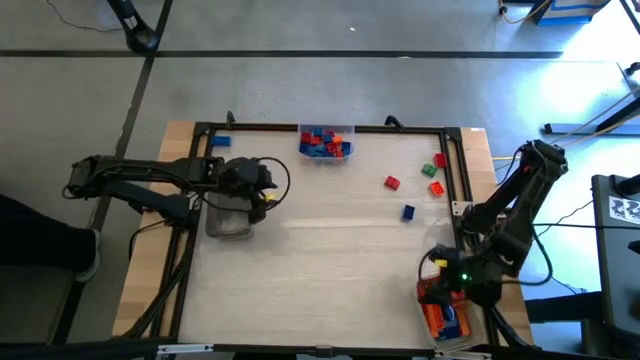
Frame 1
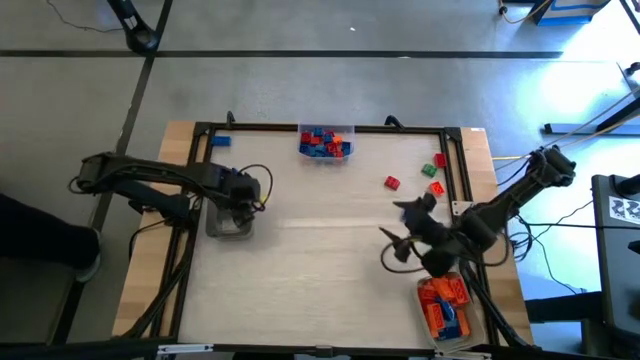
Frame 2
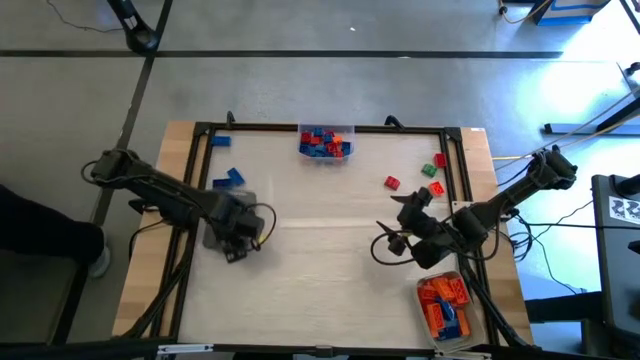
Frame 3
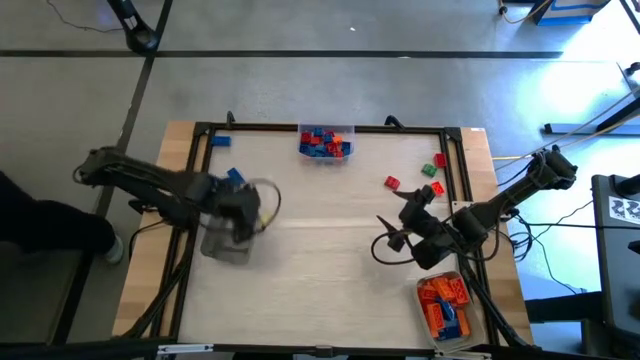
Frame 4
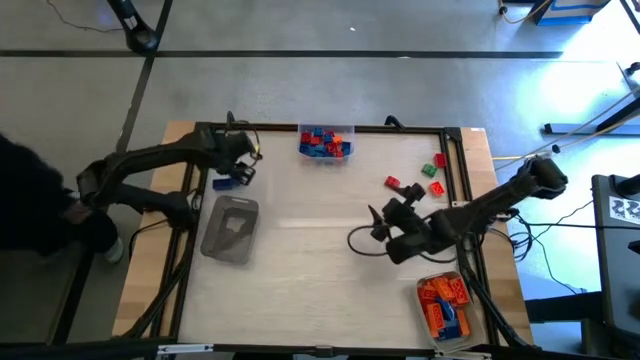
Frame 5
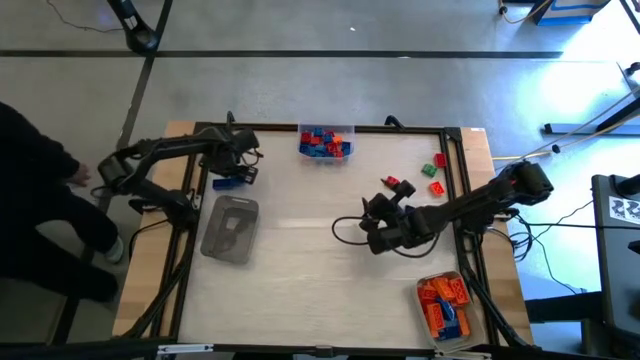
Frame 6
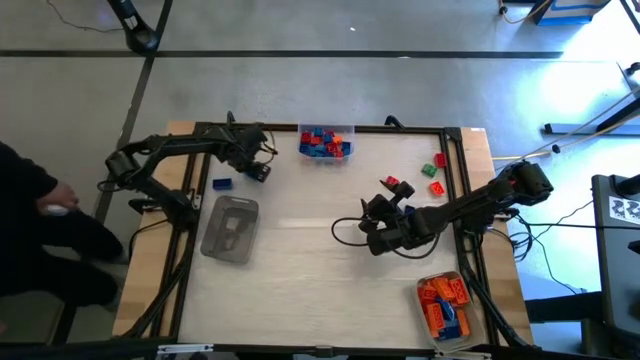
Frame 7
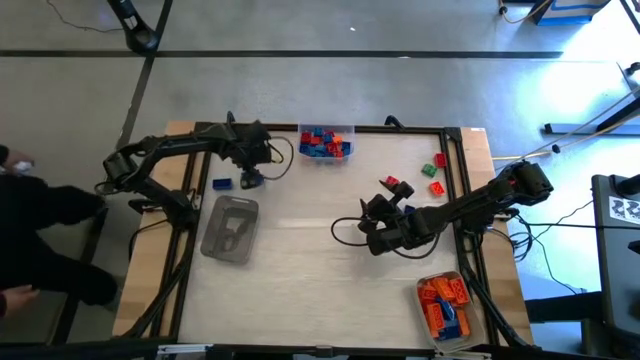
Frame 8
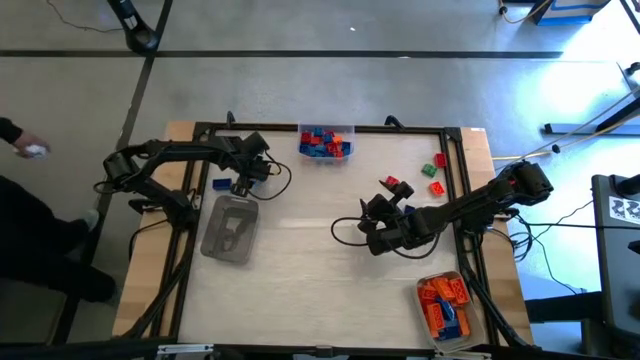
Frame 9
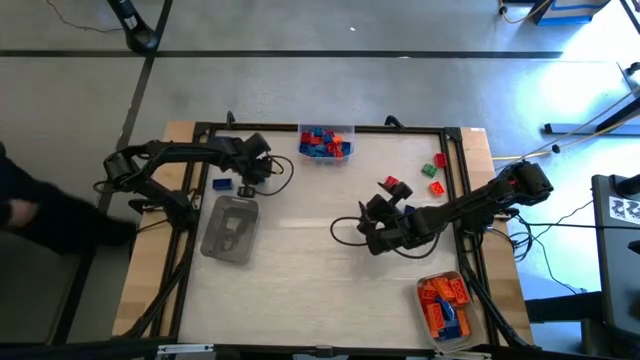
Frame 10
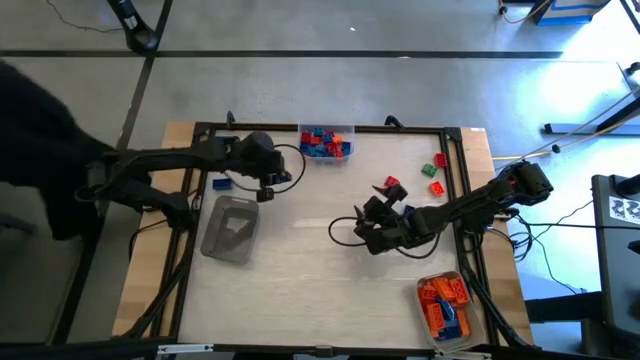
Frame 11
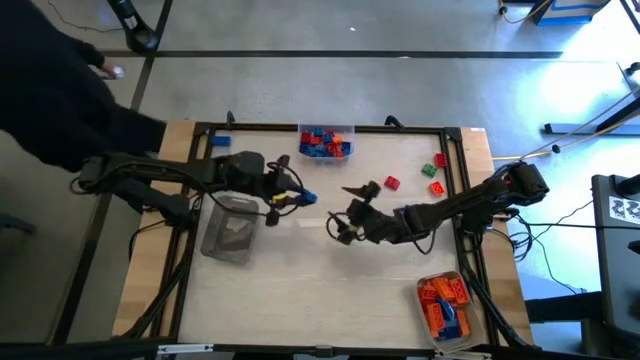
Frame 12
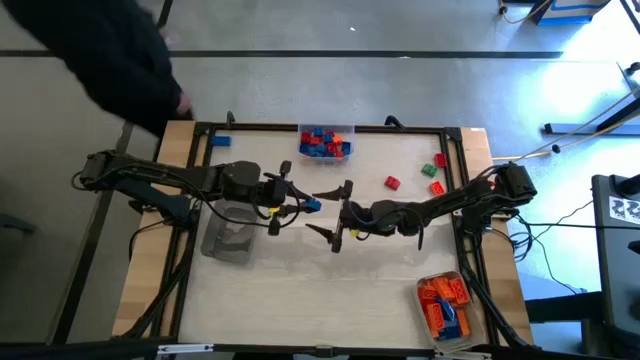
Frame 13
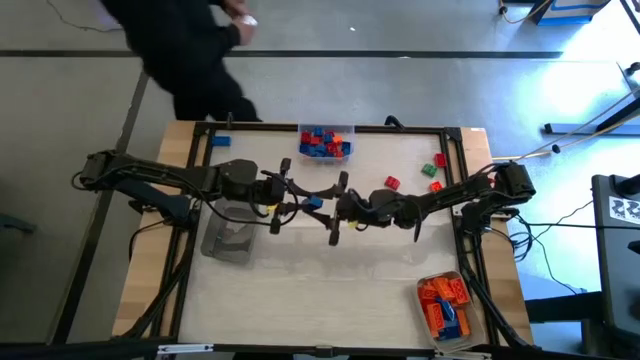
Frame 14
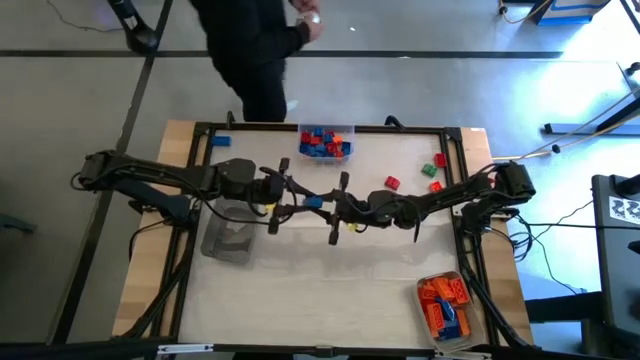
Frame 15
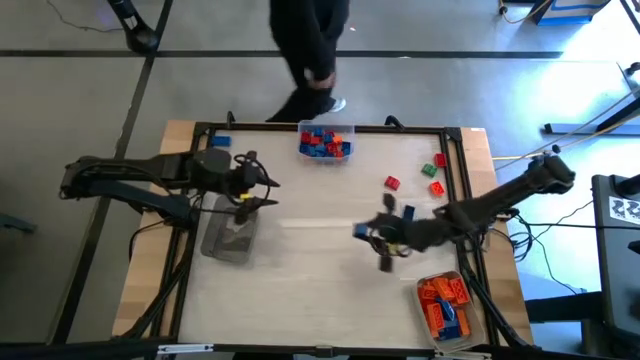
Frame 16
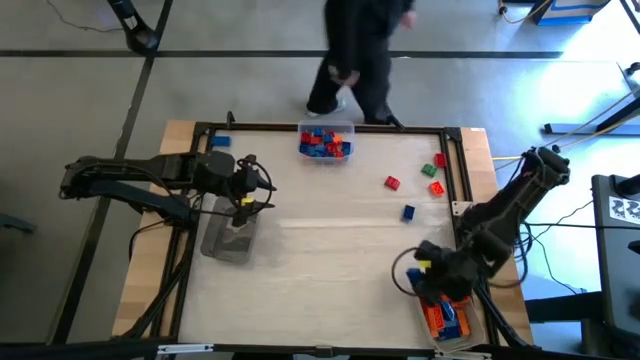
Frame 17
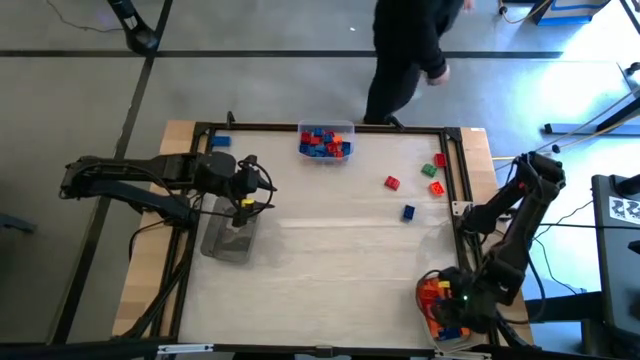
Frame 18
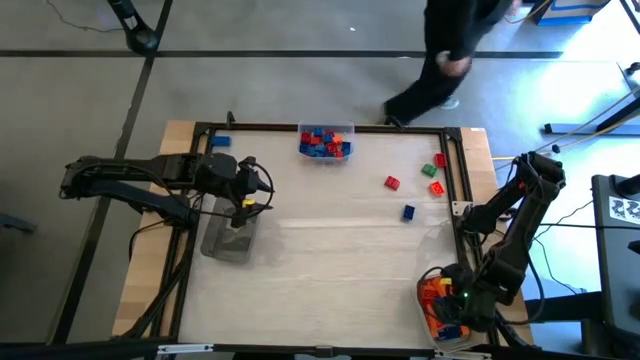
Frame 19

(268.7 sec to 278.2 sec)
Task: Sort blocks by size
Put the blue 8 stud game piece into the gray bin

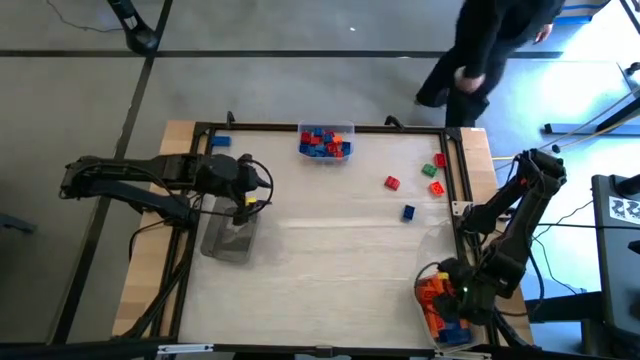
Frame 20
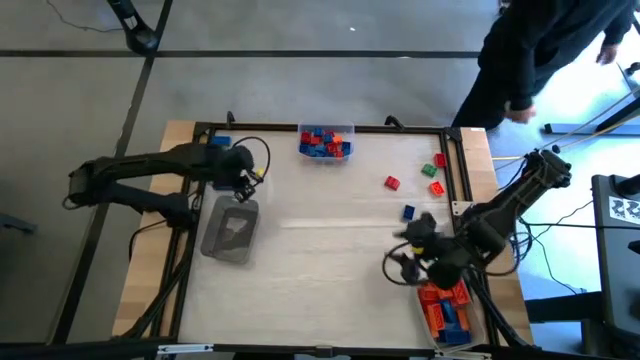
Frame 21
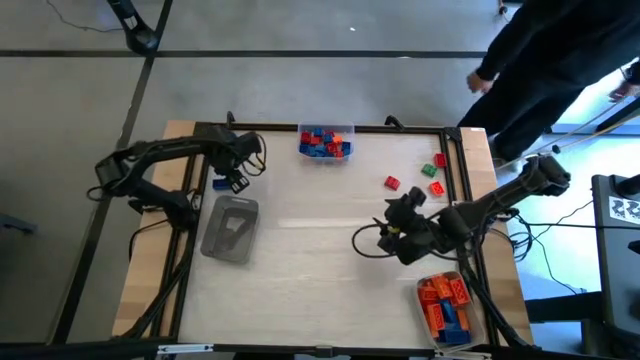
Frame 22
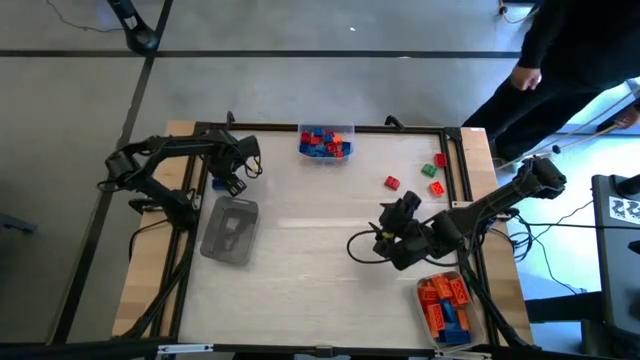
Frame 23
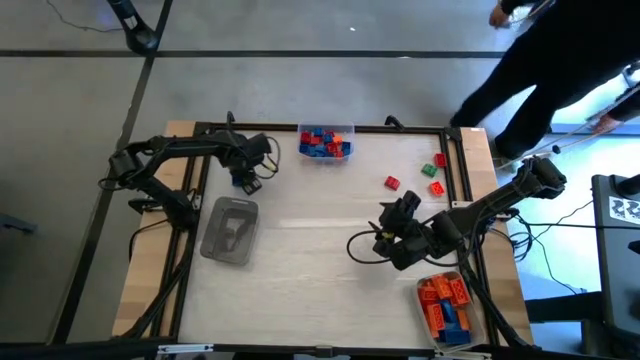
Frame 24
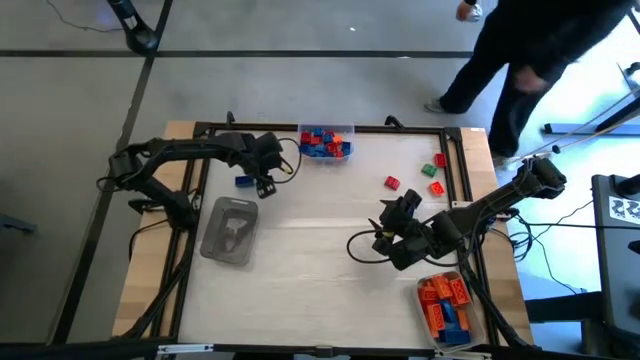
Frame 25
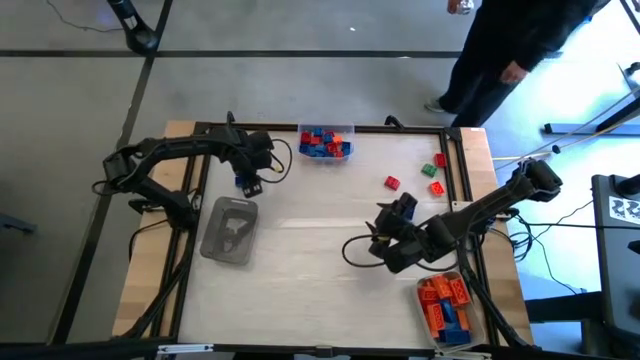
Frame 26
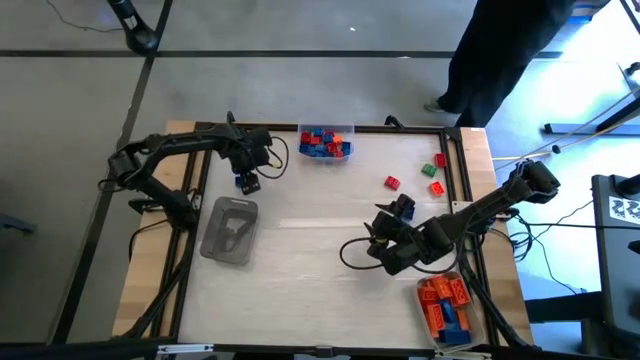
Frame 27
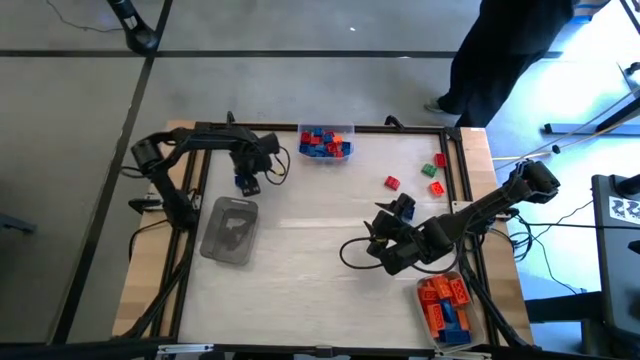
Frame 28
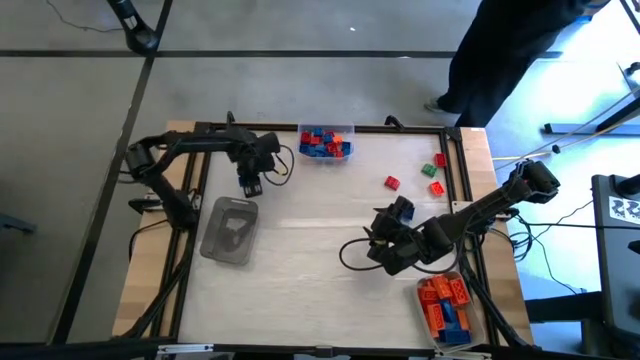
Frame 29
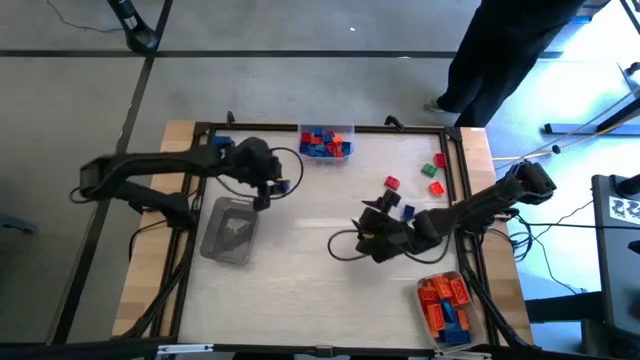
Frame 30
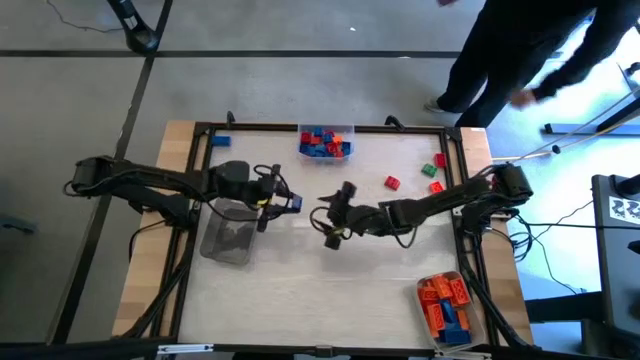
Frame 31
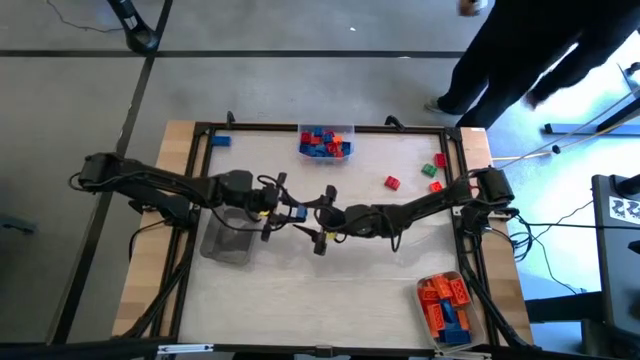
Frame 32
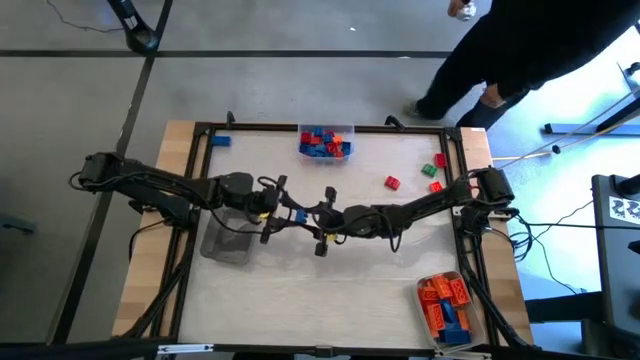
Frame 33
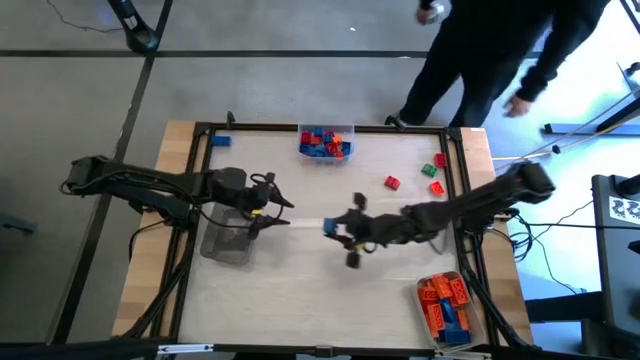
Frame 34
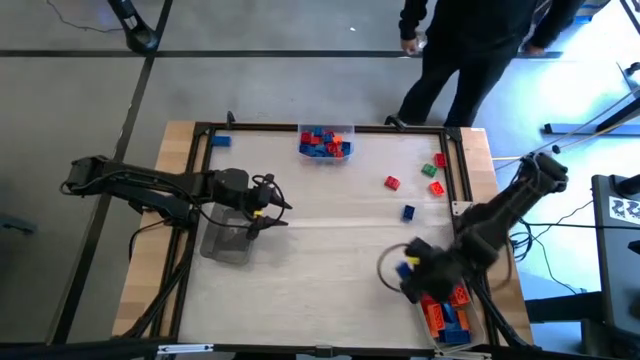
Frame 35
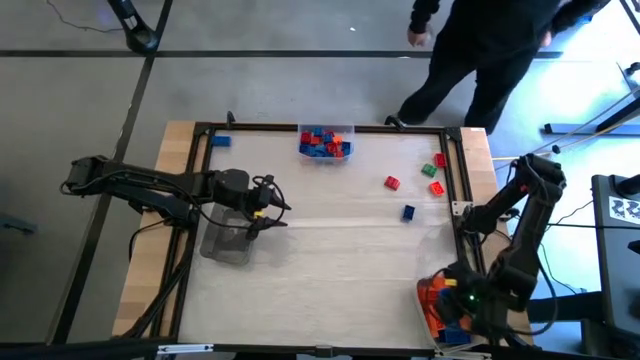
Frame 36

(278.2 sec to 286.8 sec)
Put the blue 8 stud game piece into the gray bin

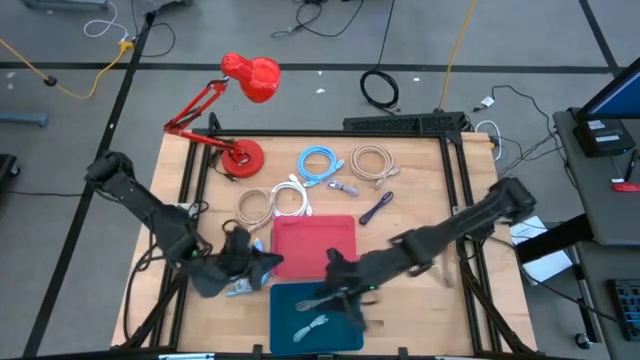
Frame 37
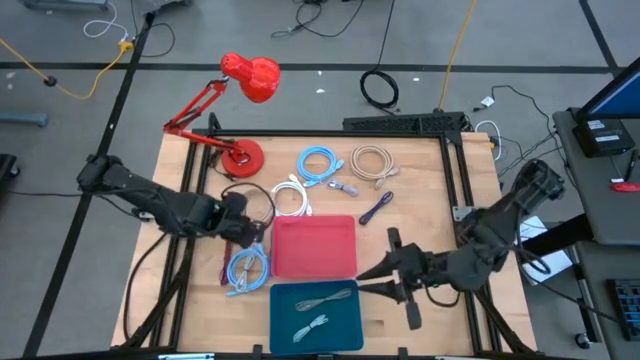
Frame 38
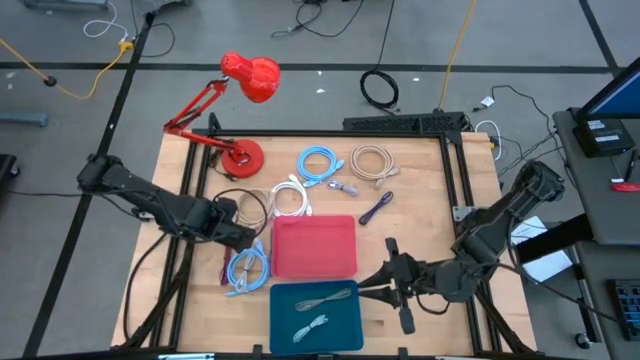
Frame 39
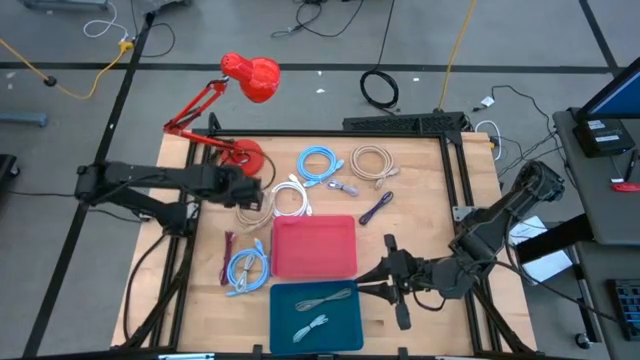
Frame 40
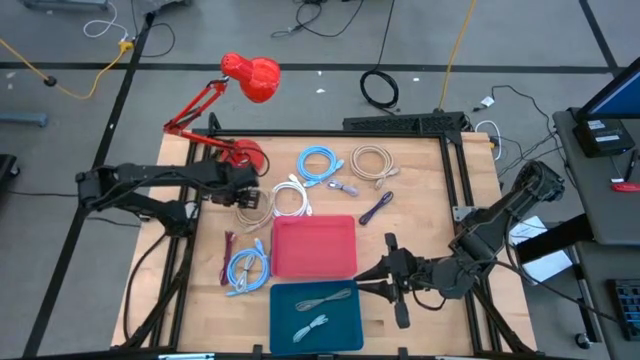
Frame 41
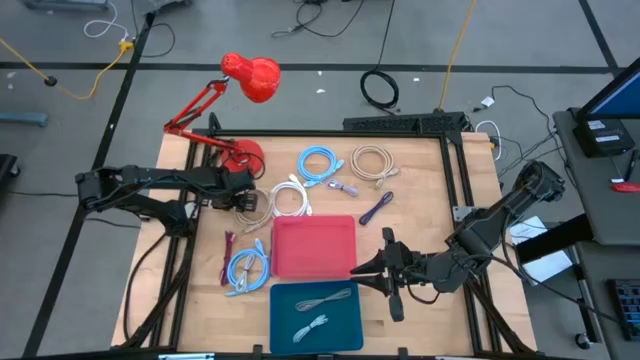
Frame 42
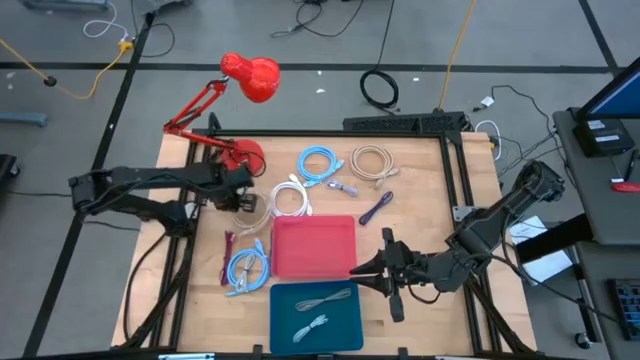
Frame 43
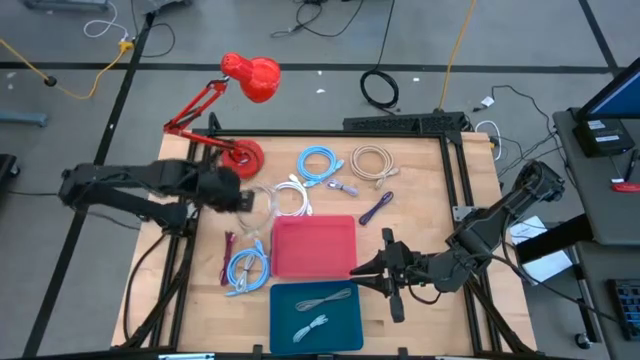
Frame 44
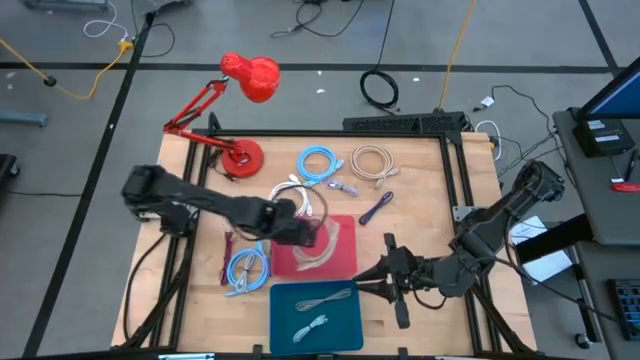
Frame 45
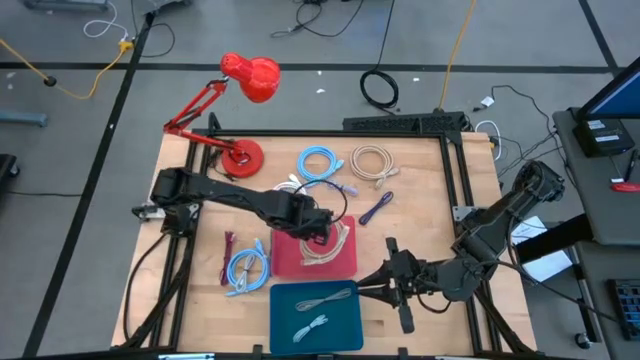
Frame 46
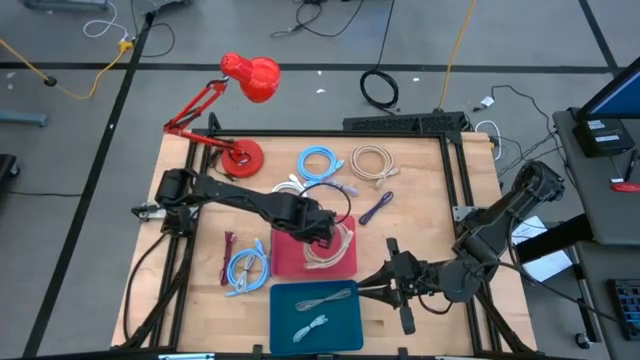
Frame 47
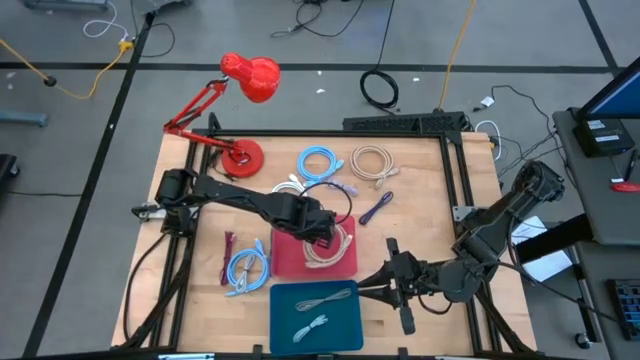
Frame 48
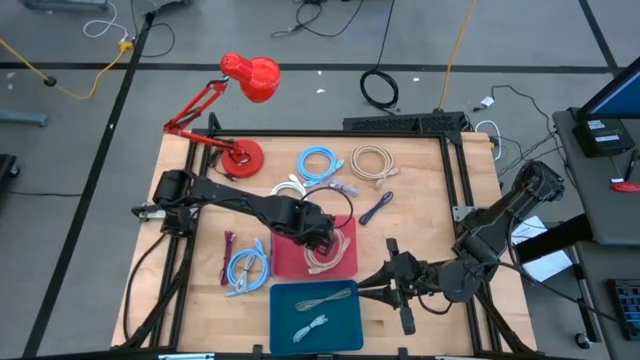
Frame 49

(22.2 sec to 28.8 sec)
Task: Pick & Place USB Port
Put the bottom light brown HDMI cable into the red bin
